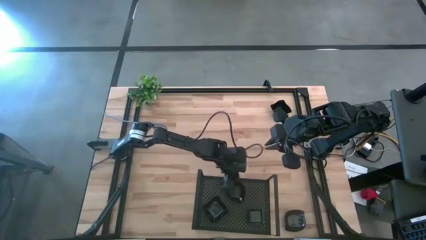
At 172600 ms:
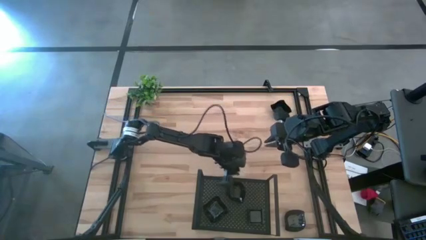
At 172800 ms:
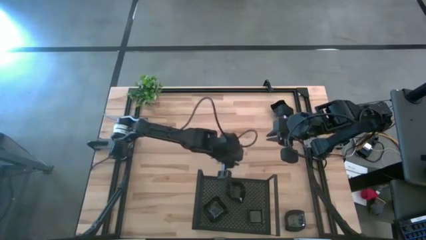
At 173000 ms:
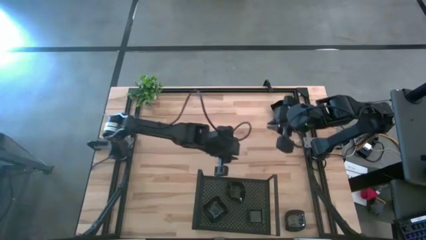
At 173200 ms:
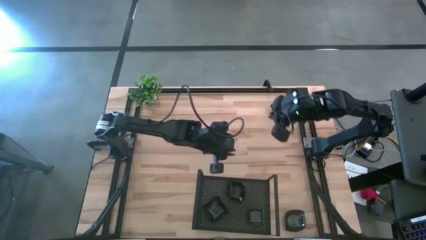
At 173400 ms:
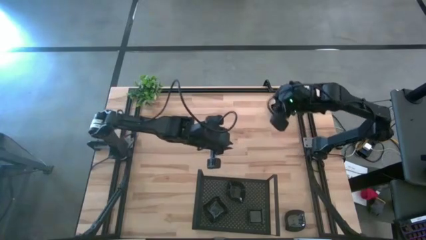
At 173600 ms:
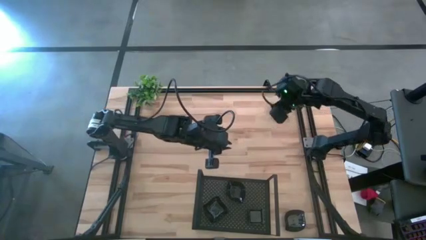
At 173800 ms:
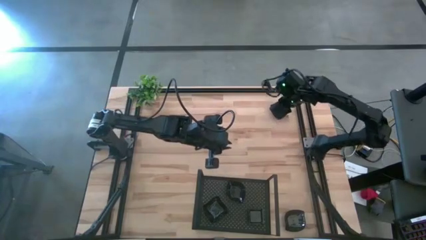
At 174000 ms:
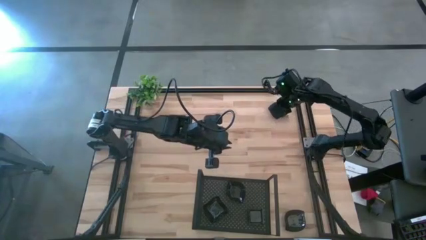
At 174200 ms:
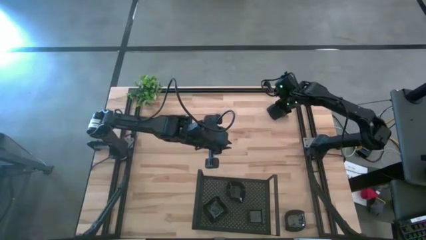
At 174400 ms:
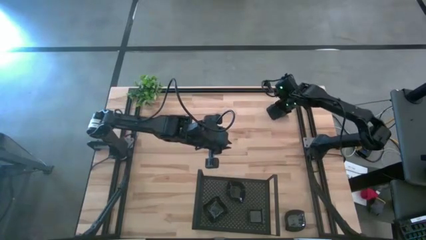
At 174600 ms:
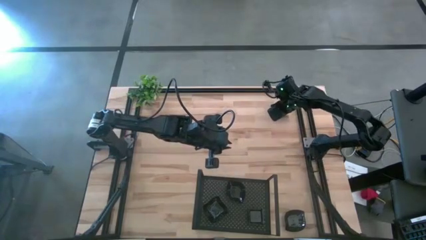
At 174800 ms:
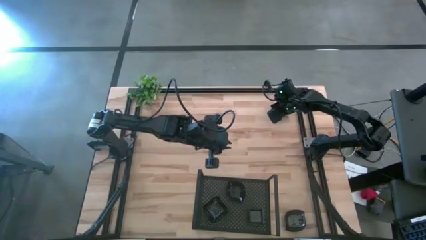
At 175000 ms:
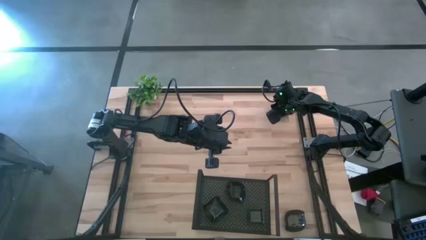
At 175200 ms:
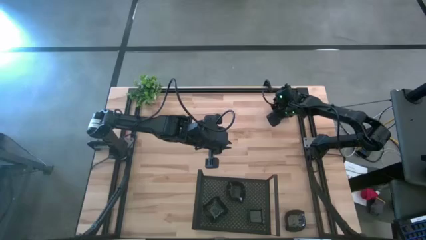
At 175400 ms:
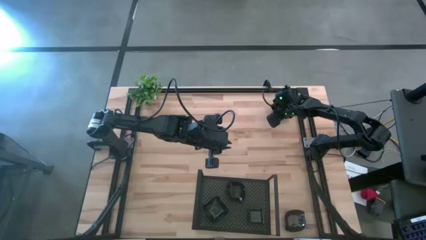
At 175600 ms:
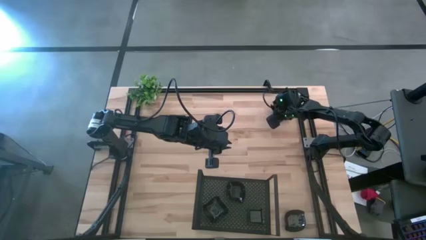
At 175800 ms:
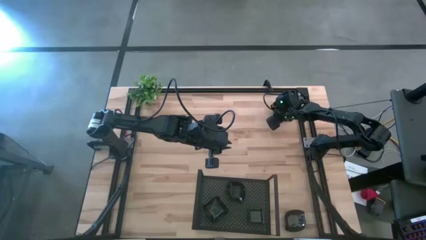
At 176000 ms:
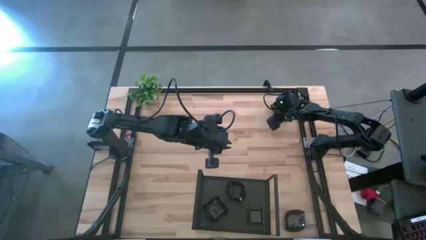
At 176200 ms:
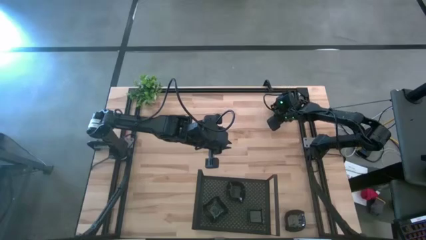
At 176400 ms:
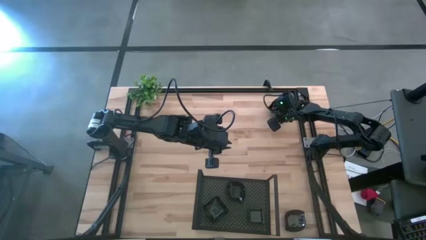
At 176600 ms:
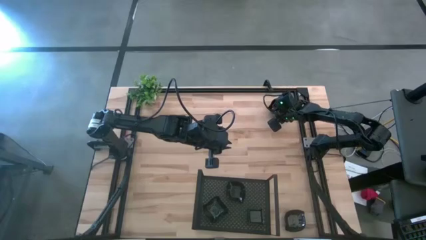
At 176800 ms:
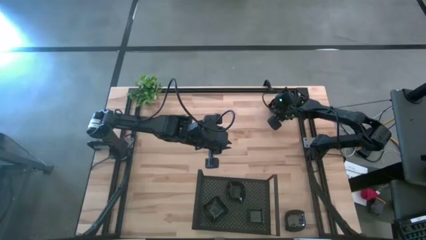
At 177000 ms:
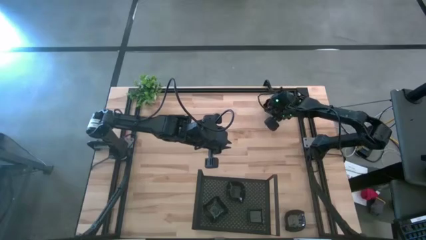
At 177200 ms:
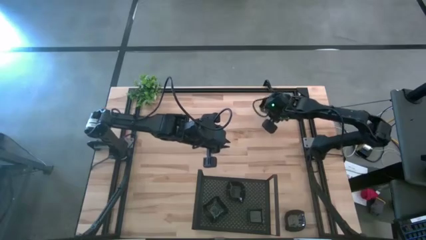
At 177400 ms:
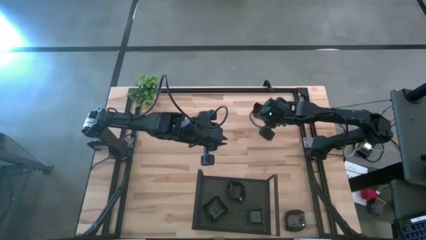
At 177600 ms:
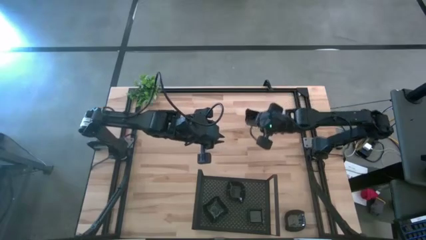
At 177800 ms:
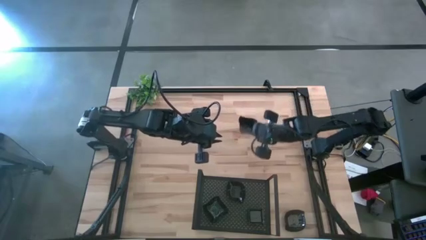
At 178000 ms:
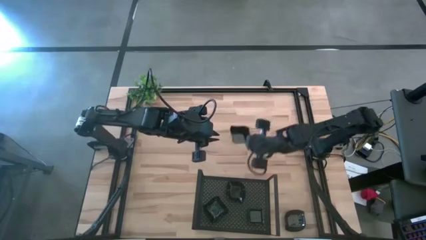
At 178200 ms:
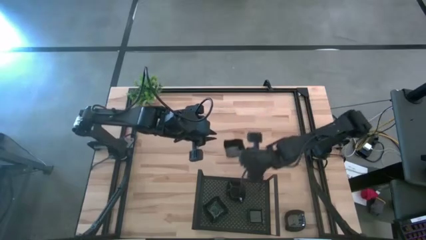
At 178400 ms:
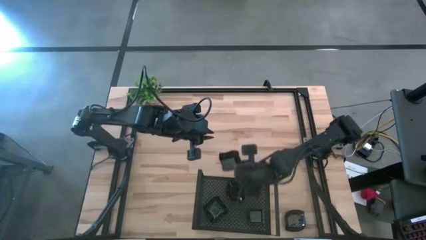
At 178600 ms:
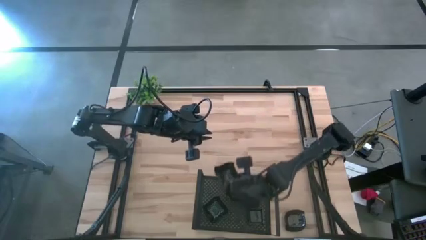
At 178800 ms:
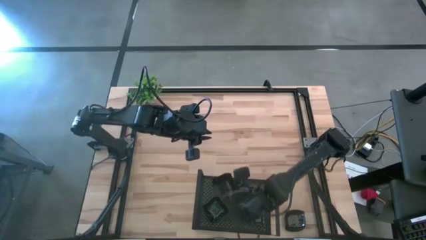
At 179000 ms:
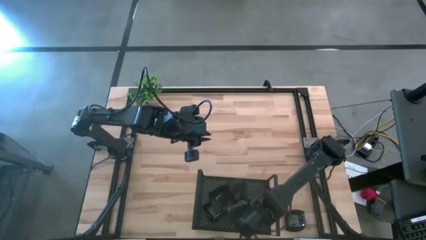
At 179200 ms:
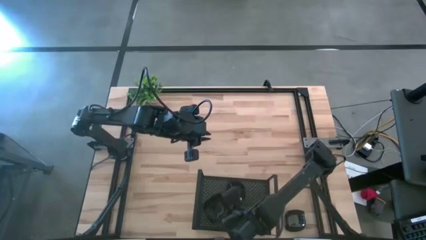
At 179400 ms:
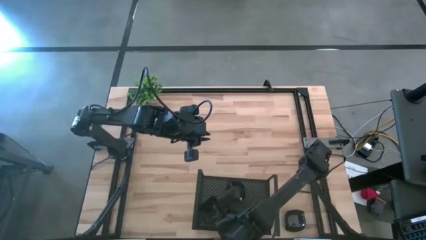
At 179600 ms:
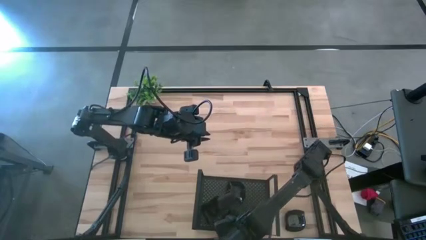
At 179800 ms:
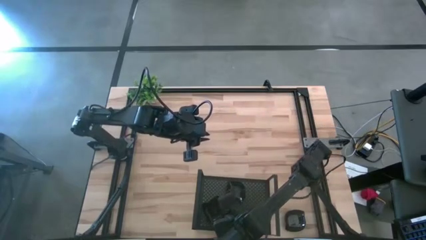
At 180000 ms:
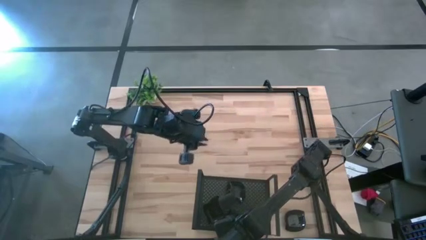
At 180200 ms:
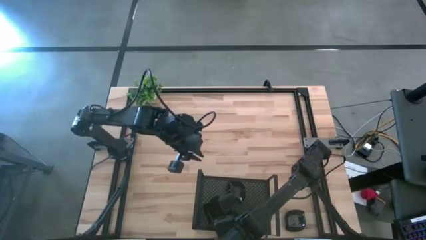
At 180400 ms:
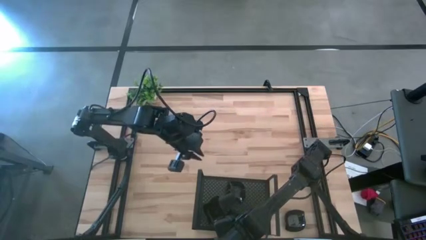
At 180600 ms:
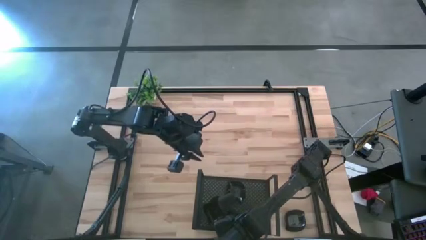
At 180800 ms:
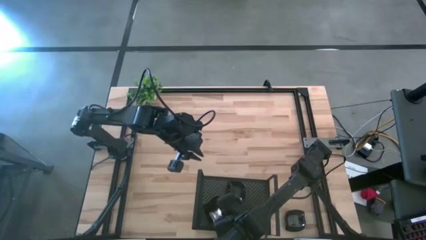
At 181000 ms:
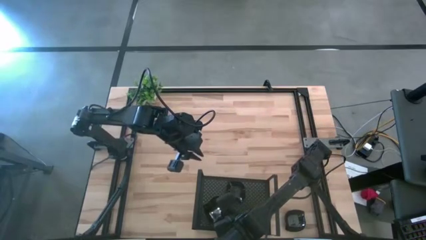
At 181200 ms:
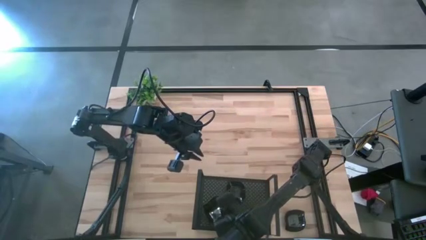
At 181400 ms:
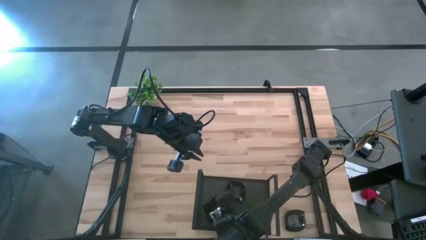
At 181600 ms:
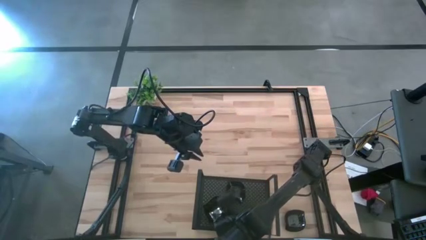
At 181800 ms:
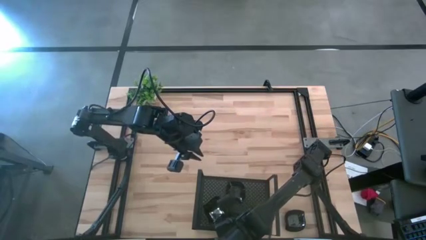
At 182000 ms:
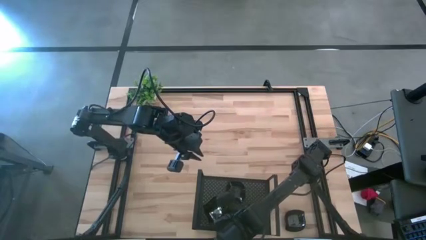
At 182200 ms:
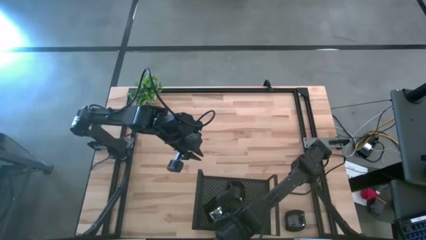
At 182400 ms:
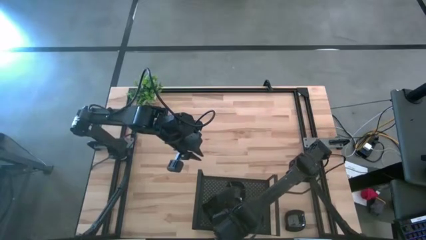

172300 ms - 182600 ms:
Task: Pick & Place Mini shaped plates
Stack the distorted square plate on top of the other distorted square plates on the shelf

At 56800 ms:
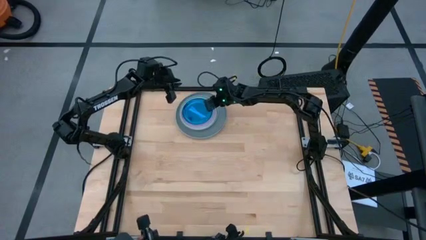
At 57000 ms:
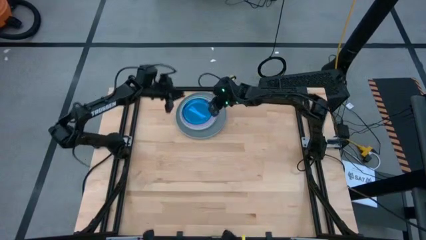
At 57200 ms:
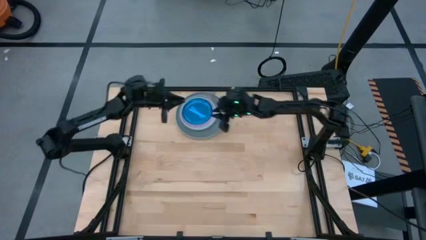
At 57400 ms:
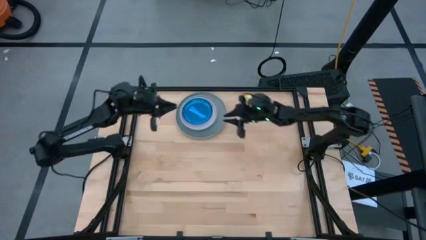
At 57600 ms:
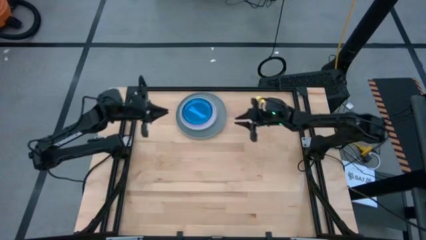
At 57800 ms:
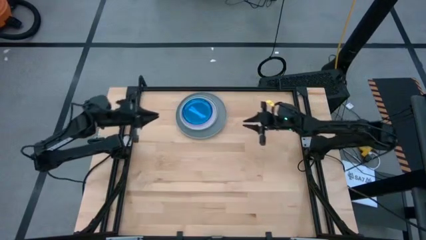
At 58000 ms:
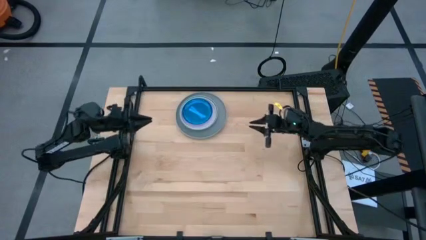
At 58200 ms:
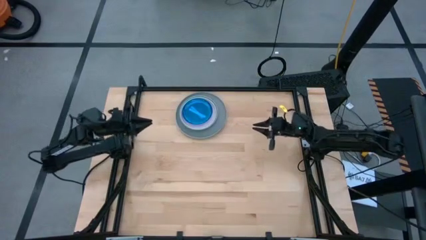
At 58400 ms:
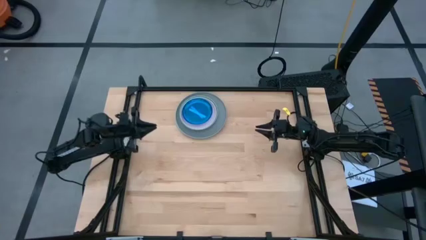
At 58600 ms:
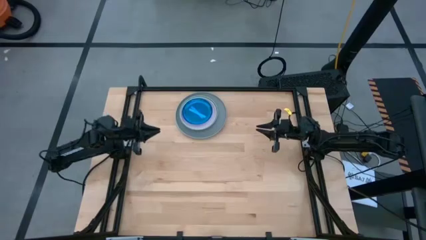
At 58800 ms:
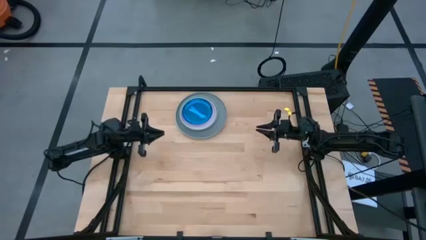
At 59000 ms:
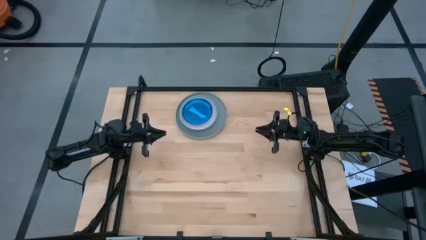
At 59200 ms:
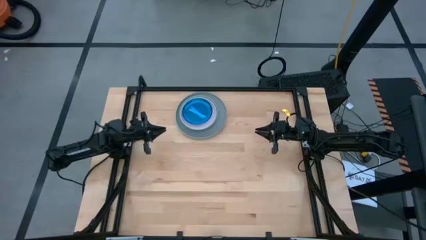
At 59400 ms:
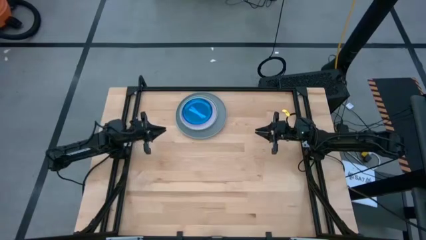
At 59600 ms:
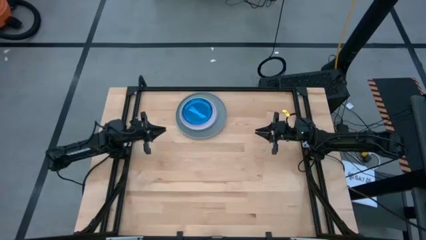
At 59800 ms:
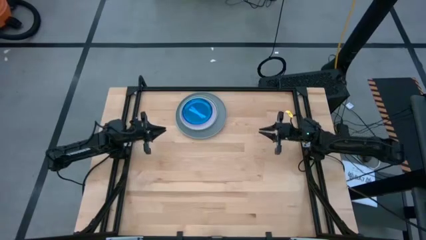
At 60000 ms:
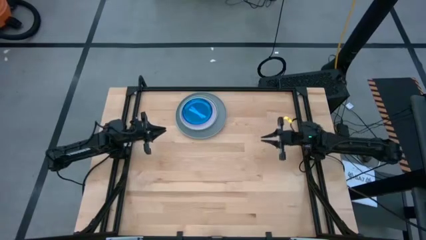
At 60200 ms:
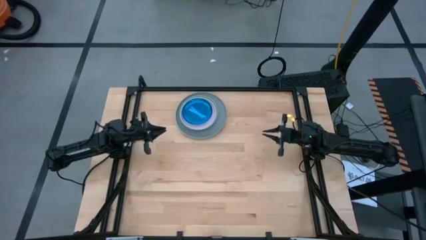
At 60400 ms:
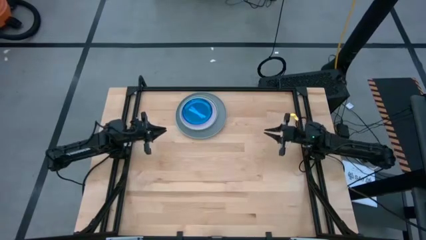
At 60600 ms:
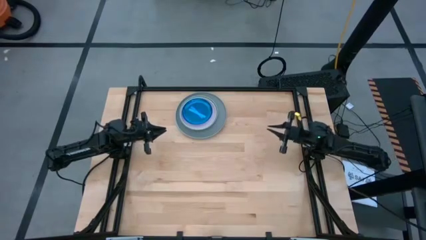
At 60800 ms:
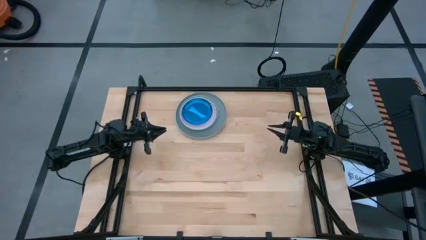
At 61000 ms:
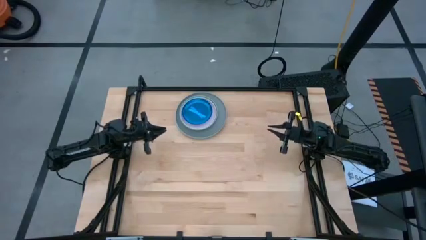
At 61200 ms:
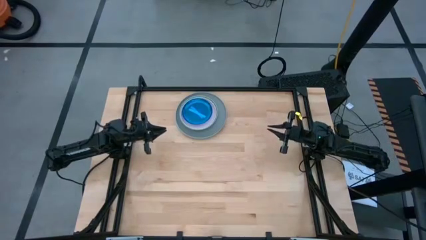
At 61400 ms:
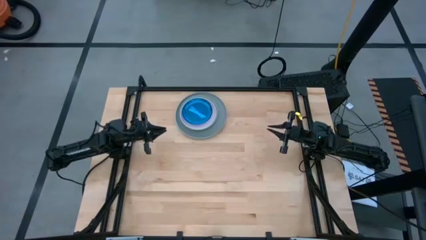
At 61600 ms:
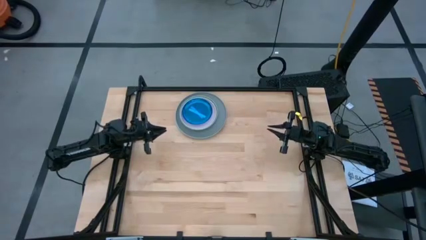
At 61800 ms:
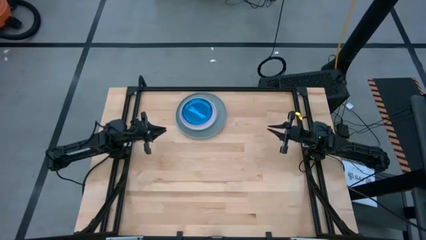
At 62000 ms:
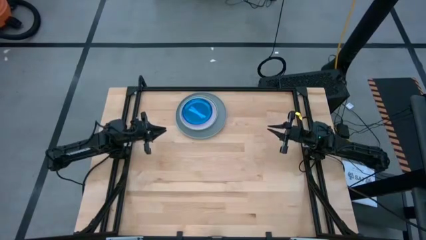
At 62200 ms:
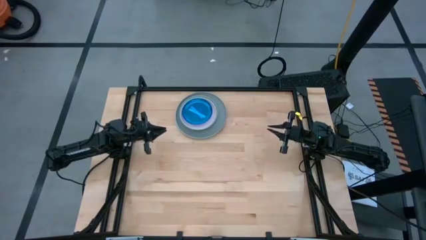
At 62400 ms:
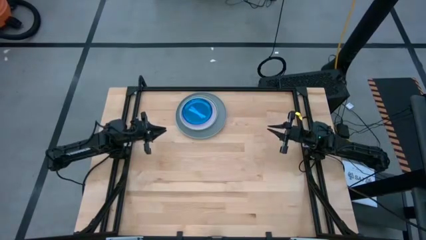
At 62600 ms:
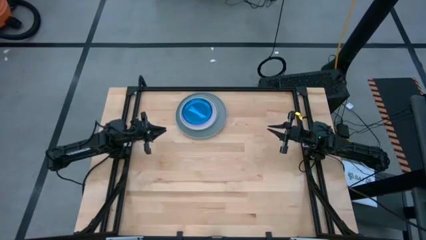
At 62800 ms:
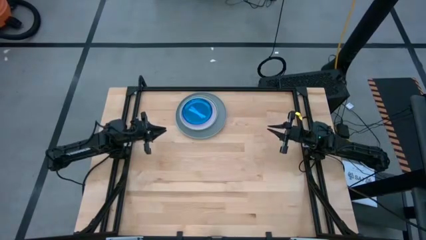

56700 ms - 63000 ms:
Task: Stack plastic plates
Return to Home Position
